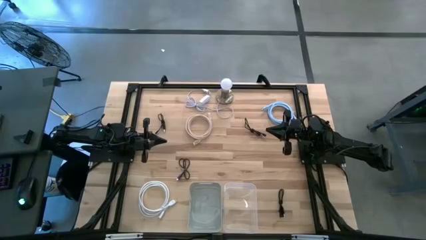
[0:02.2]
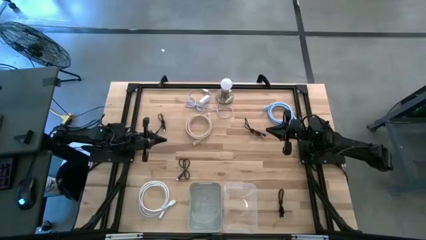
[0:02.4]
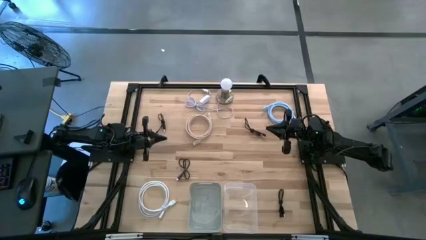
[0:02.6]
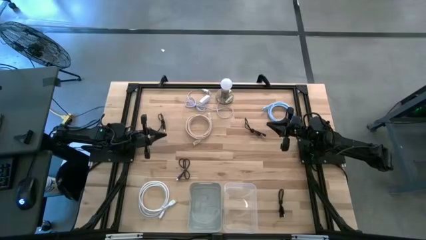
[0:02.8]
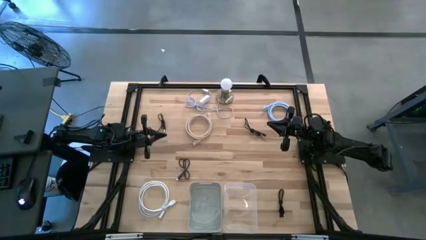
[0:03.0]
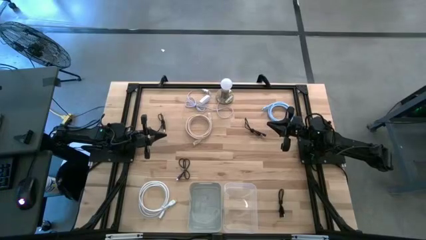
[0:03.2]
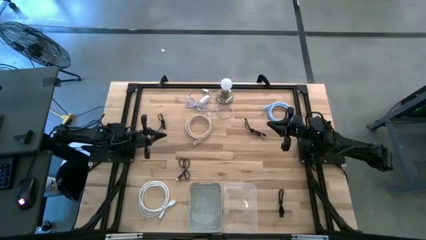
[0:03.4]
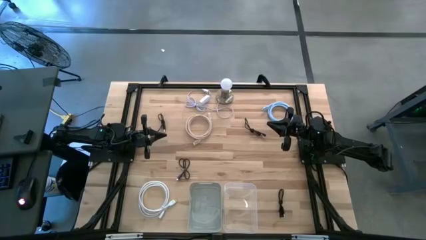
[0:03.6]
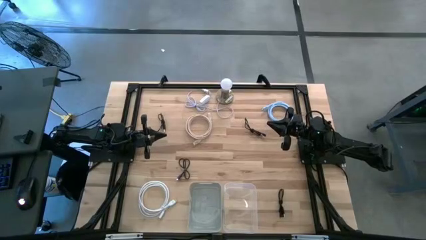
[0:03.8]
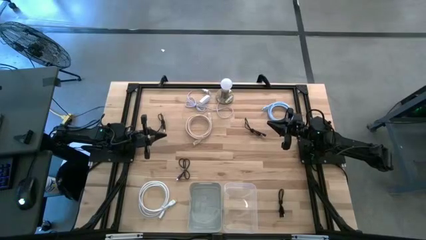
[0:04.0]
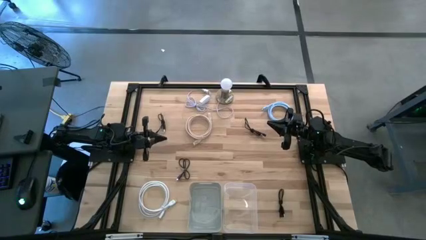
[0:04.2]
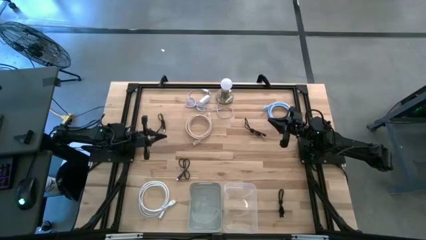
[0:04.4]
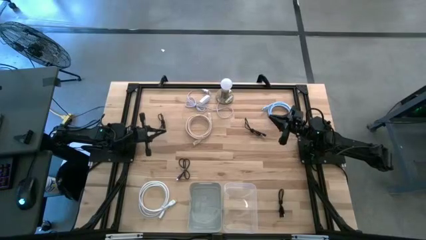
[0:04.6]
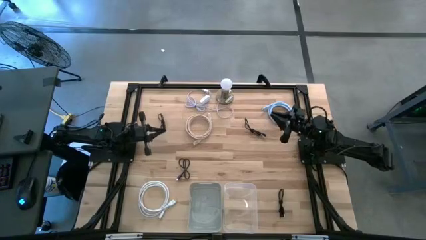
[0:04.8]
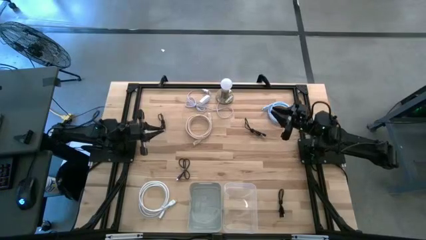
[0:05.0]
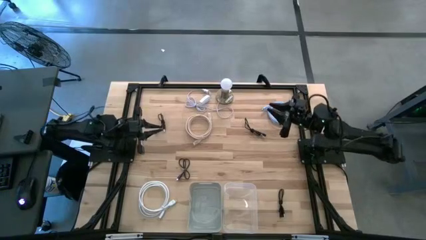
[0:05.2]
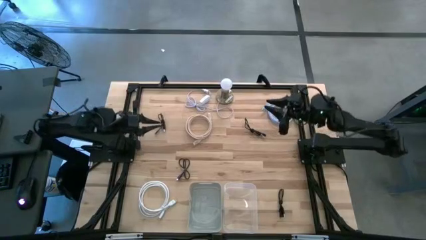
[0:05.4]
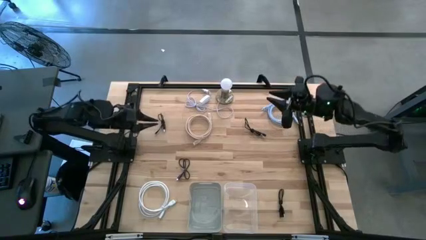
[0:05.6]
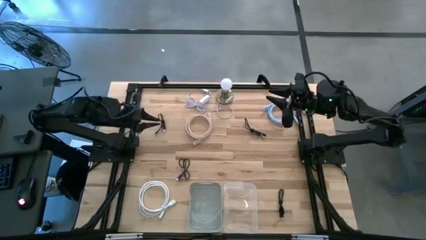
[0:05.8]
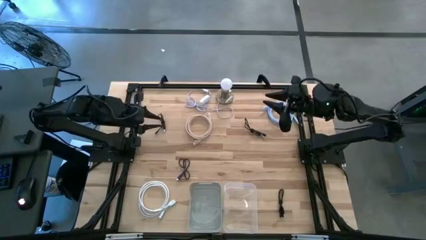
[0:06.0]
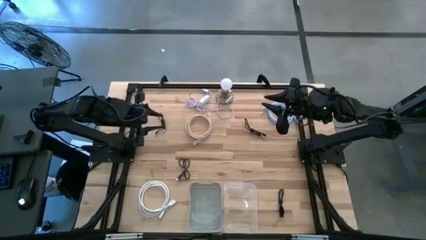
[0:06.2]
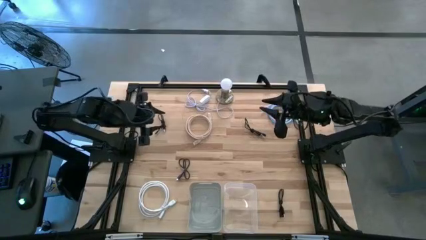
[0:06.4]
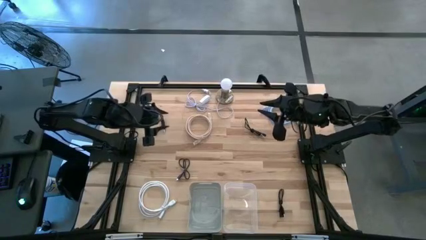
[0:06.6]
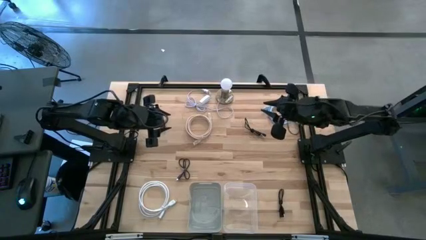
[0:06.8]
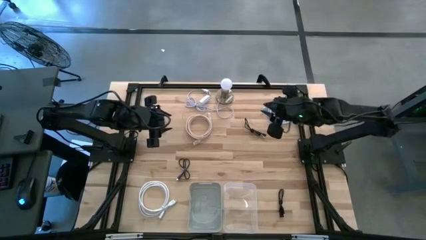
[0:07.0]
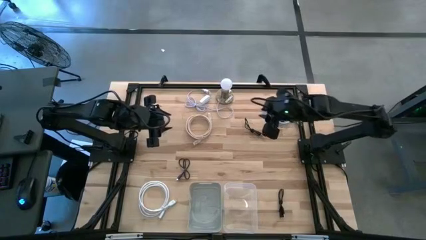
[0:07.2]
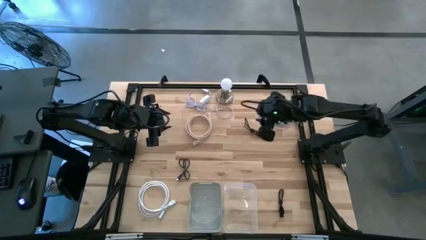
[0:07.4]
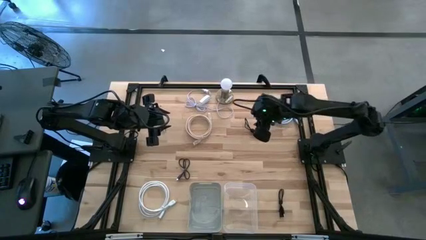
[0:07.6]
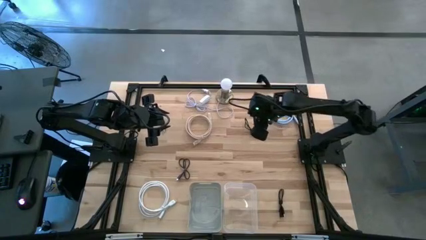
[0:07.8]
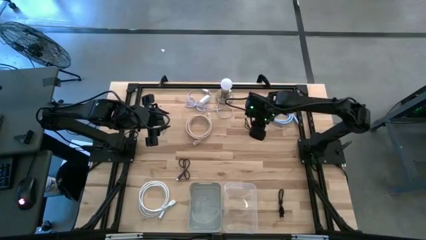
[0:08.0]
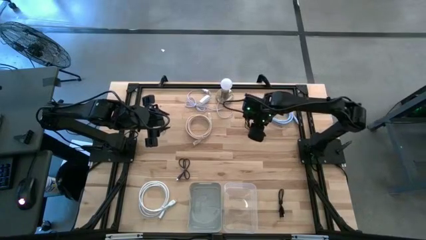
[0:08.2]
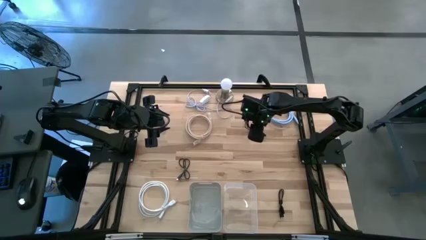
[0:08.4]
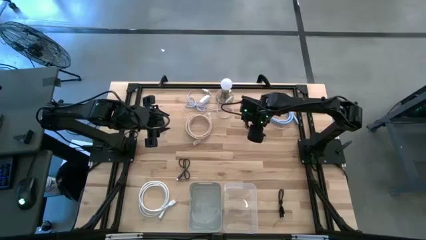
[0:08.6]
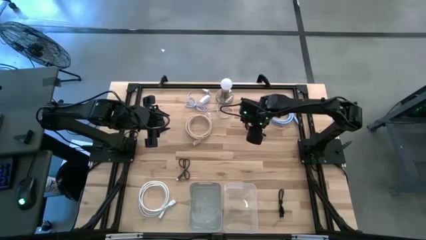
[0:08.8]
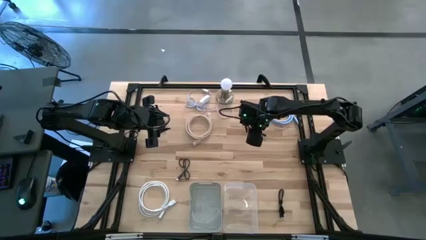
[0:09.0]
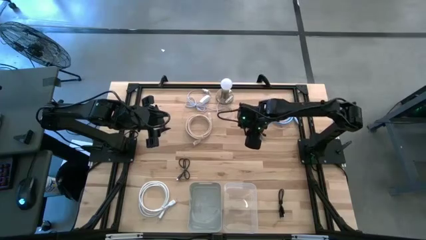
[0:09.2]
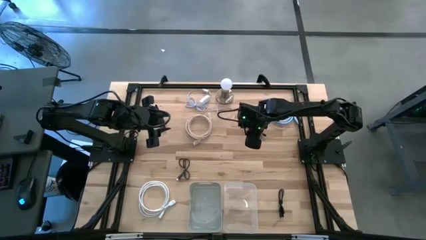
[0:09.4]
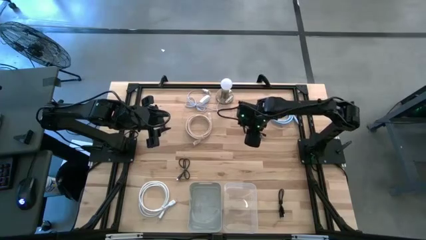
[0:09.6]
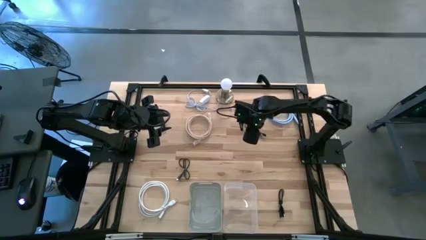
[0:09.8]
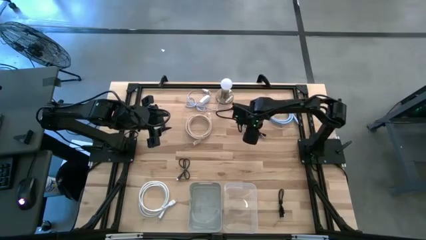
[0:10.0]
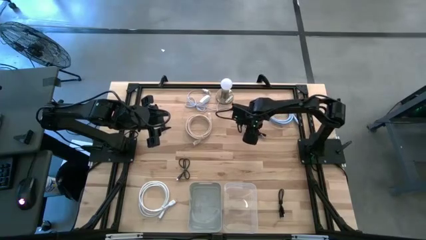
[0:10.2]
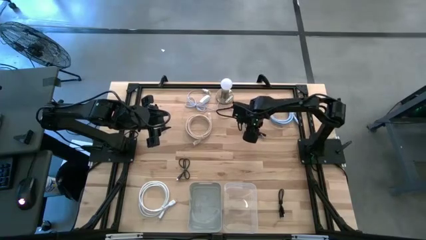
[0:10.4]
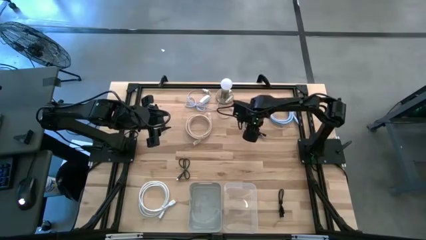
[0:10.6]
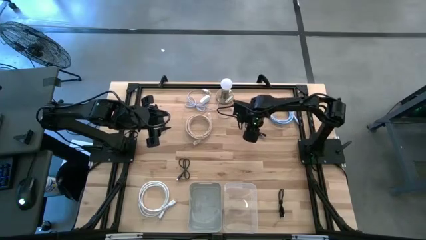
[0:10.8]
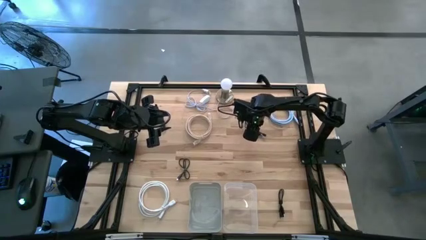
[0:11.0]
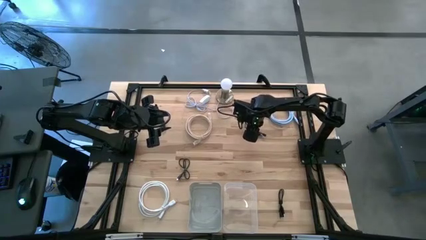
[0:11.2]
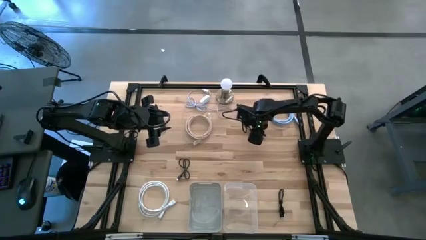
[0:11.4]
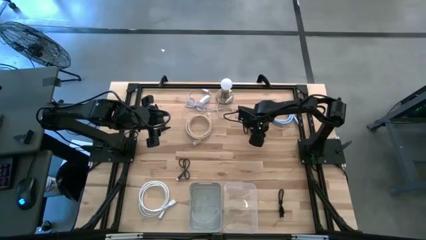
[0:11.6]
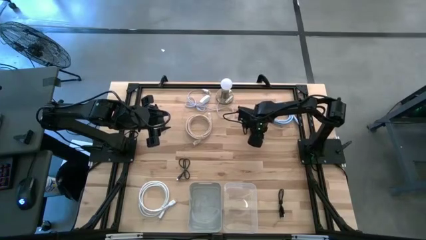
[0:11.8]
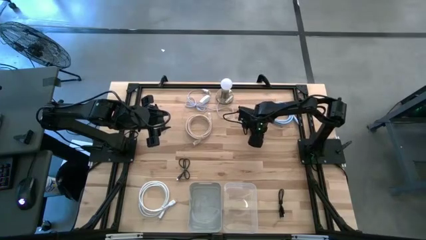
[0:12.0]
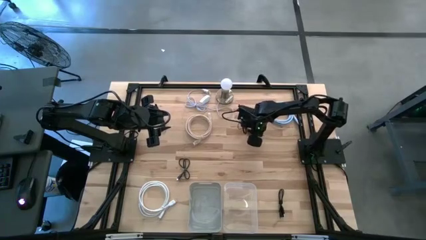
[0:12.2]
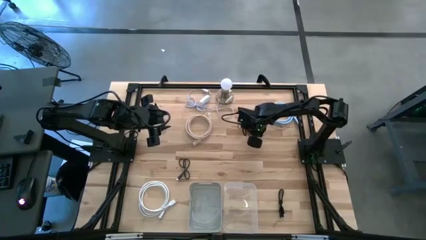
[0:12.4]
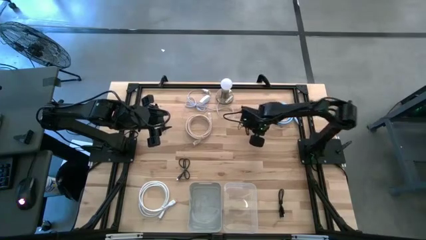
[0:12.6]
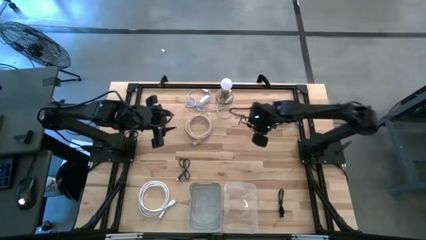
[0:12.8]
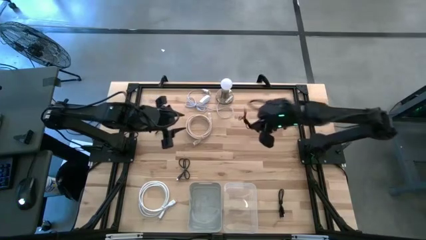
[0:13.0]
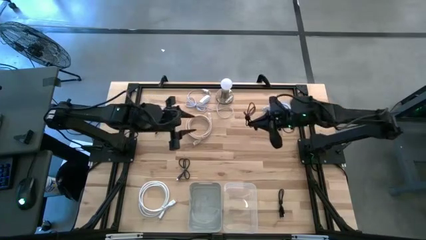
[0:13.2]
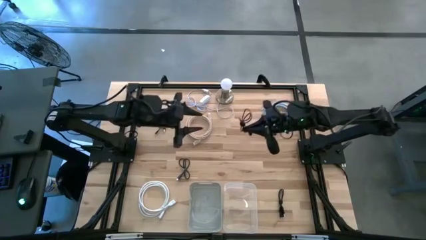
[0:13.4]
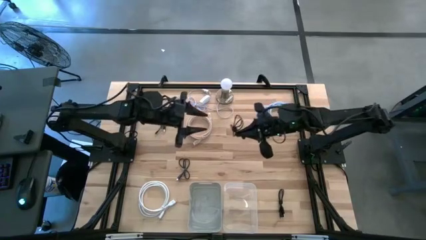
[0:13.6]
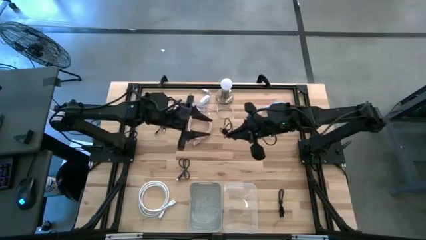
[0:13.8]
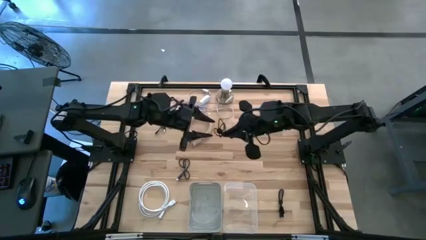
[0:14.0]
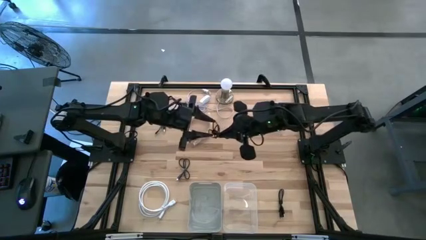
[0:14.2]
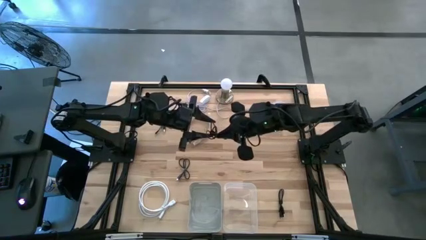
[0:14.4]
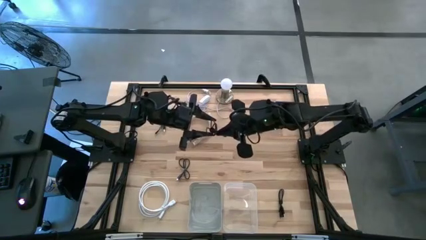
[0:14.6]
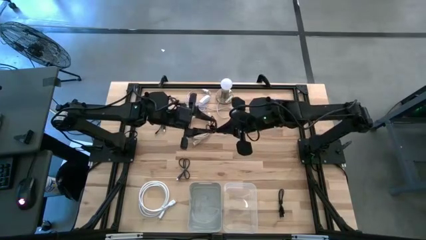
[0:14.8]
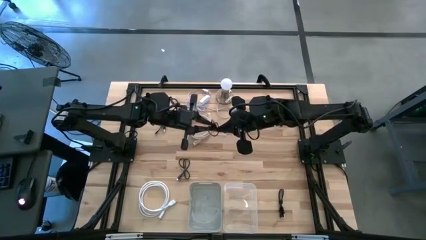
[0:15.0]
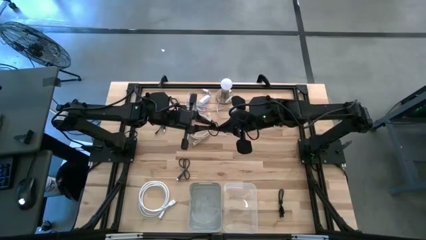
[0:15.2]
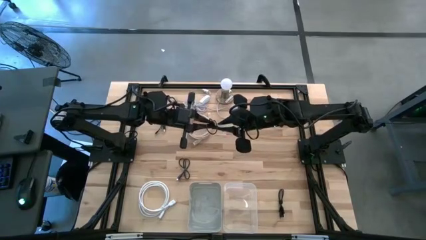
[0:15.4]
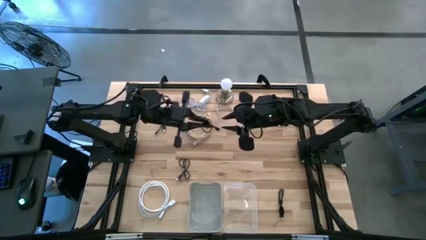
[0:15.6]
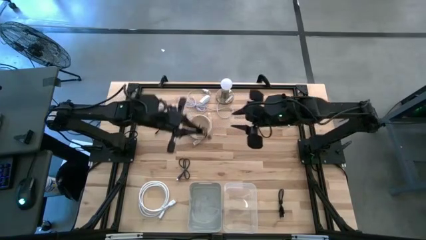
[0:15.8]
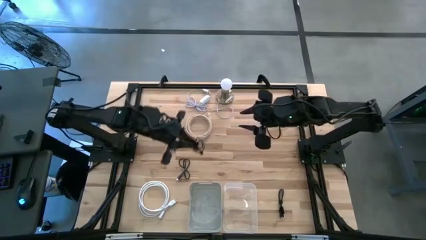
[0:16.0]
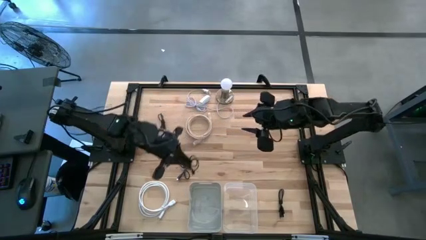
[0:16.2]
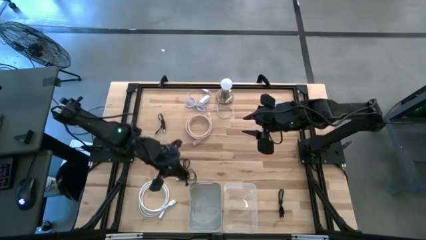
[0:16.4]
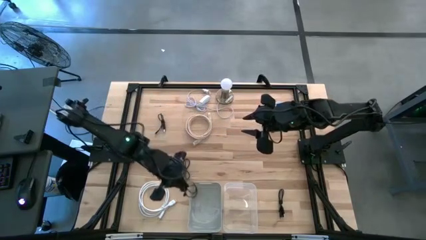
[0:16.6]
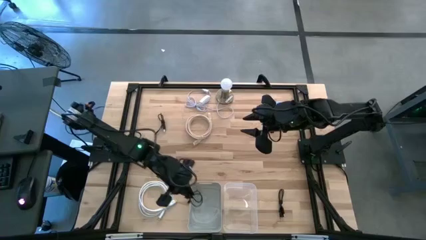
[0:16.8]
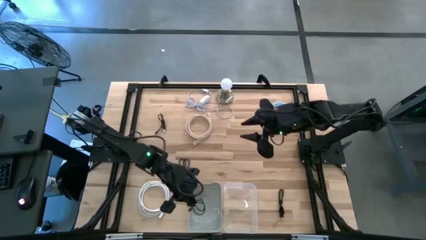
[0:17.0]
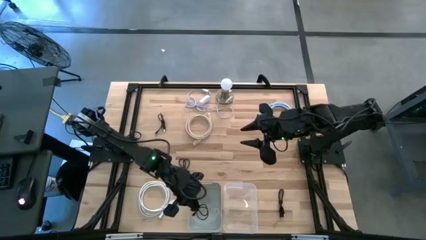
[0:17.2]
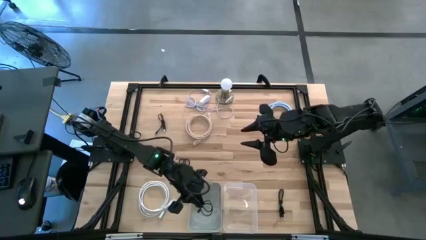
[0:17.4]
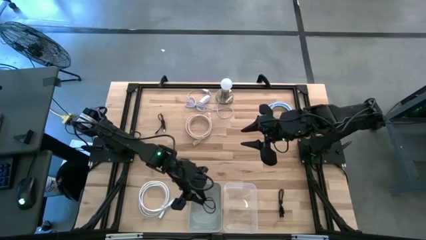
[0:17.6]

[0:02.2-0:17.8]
Task: Pick & Place USB Port
Put the black USB cable into the gray bin
